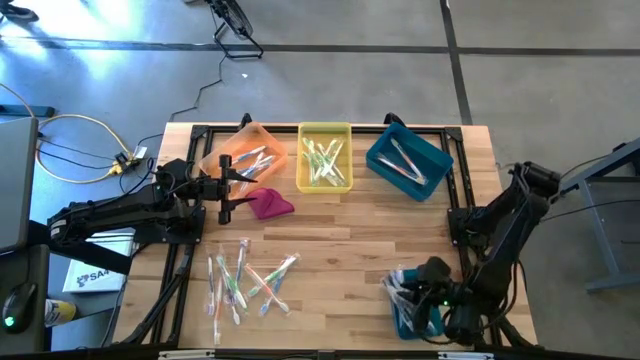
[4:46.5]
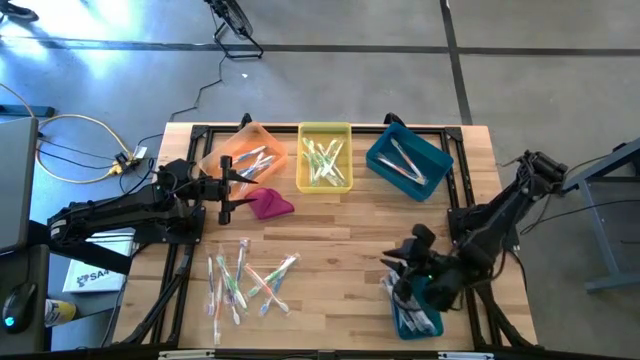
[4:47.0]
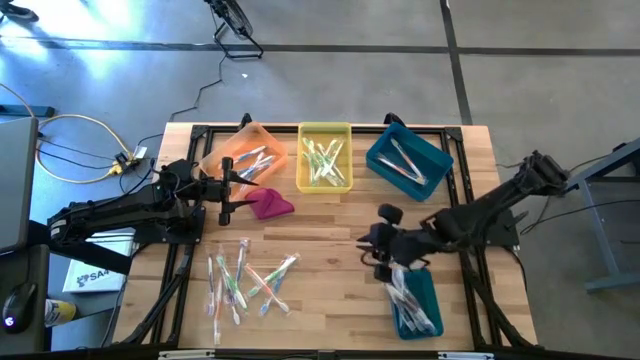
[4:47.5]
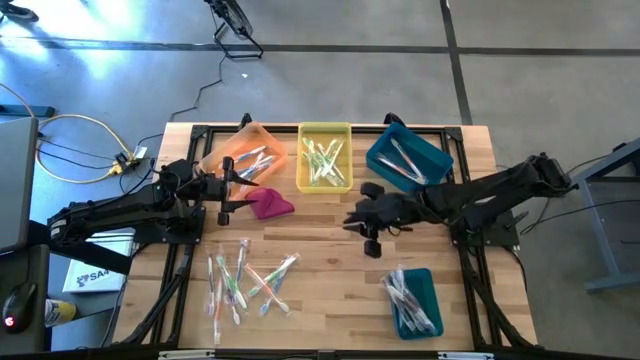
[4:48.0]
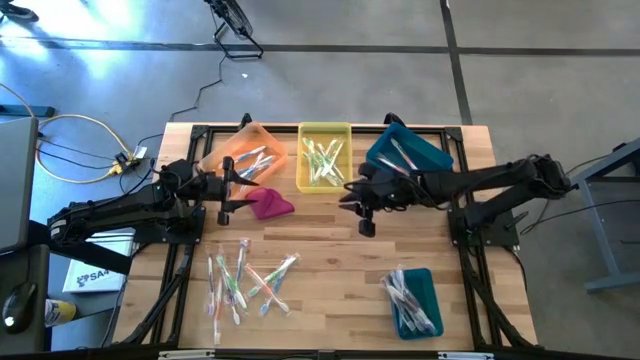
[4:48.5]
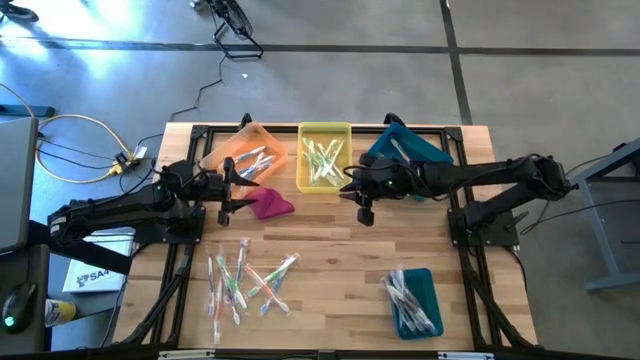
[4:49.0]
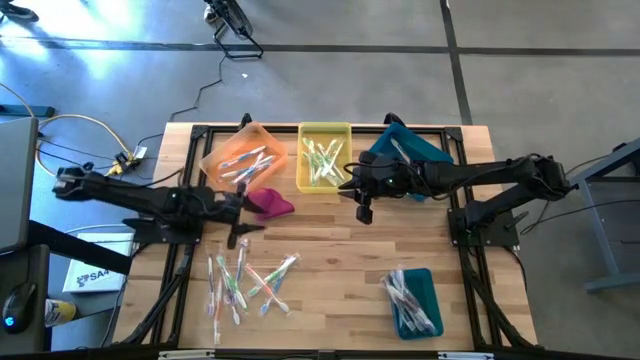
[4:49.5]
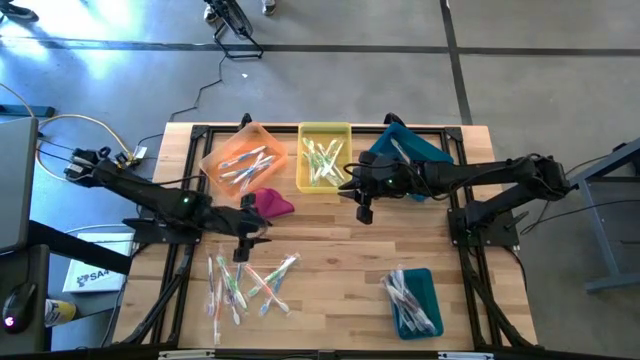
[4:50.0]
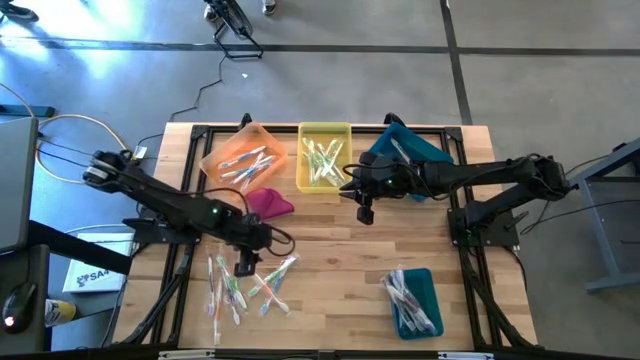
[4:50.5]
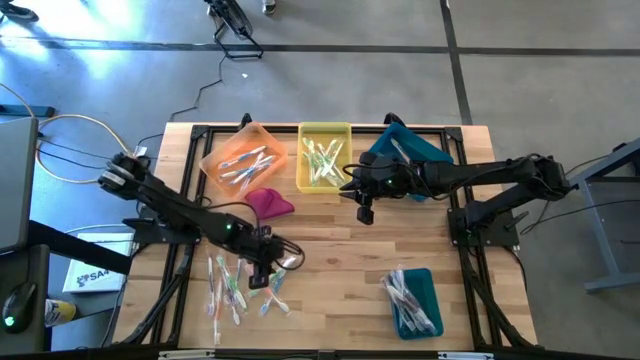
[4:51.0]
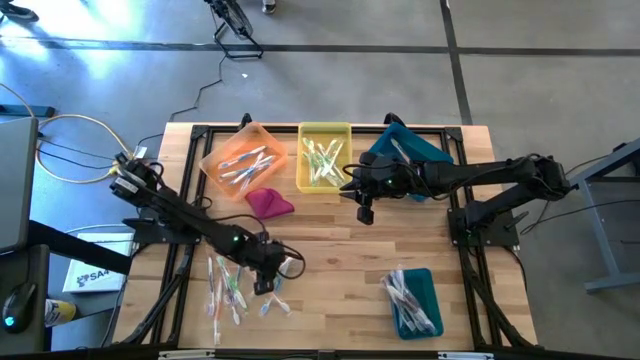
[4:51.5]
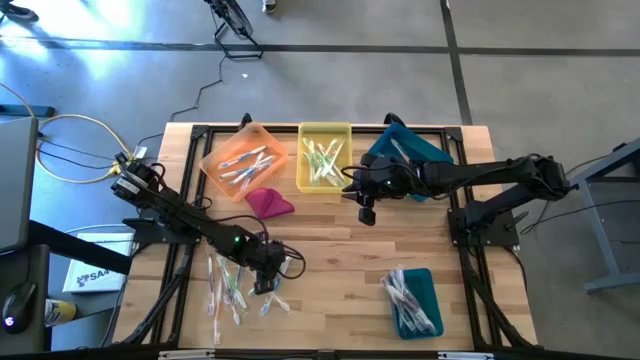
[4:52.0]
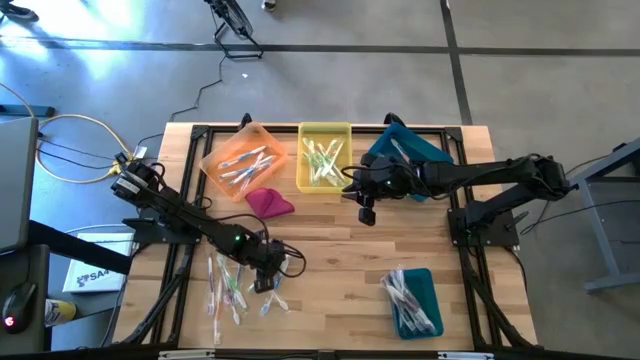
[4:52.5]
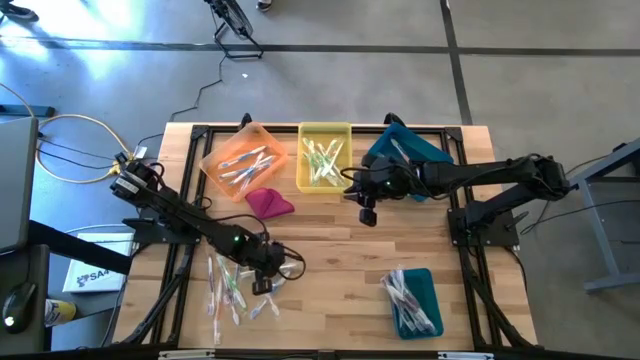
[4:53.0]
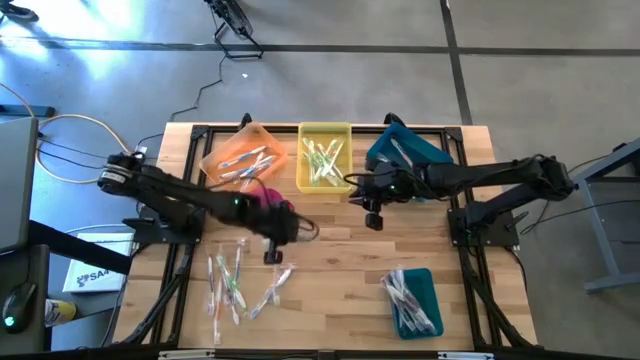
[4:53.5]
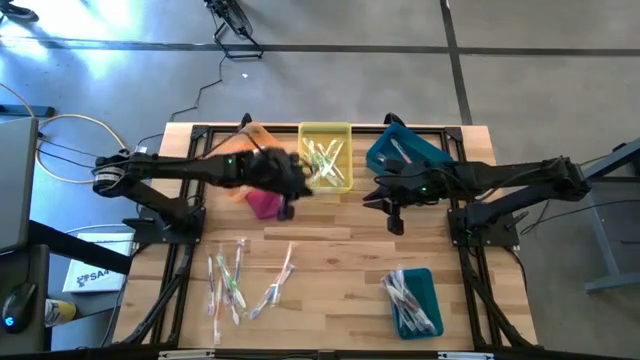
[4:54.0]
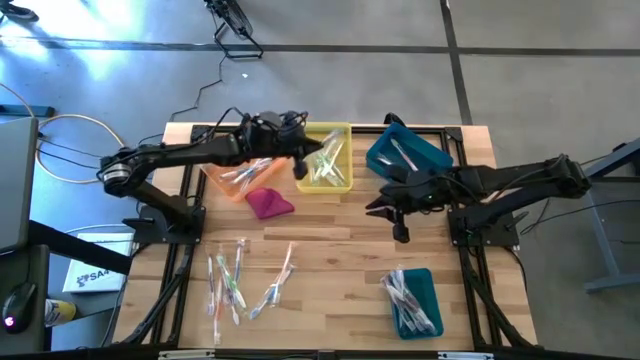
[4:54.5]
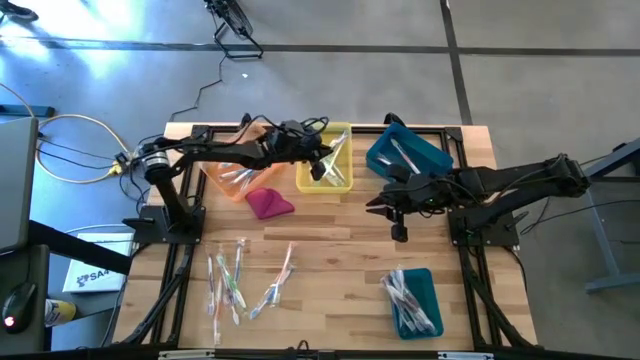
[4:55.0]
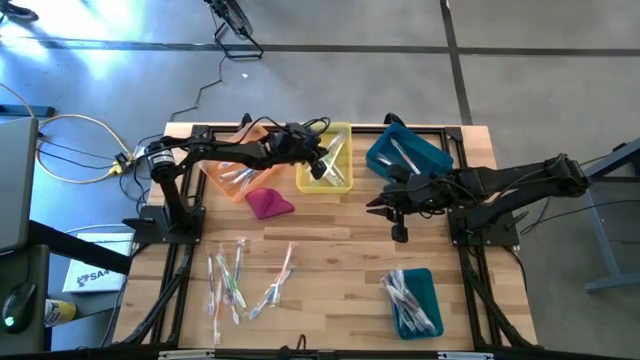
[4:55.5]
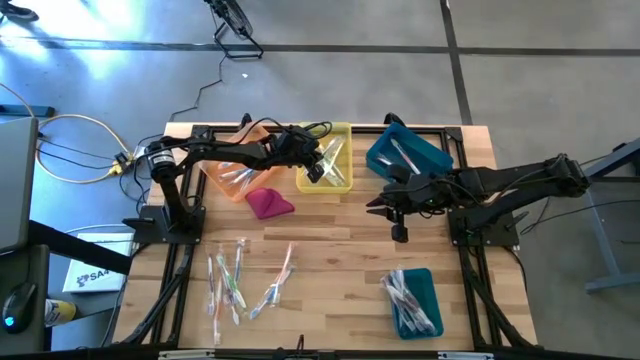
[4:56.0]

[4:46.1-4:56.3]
Task: Pick & Place Toothbrushes
Put the green toothbrush into the yellow bin

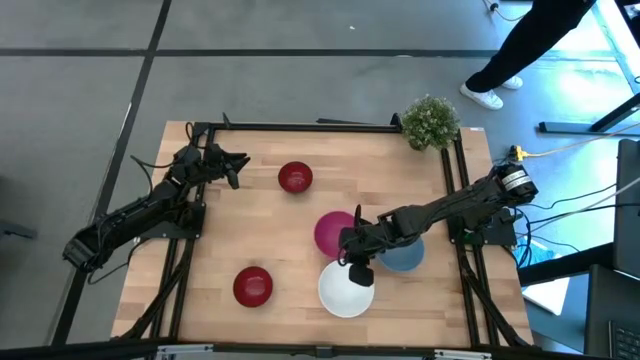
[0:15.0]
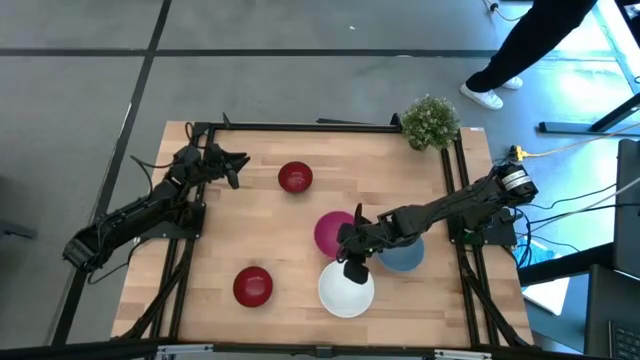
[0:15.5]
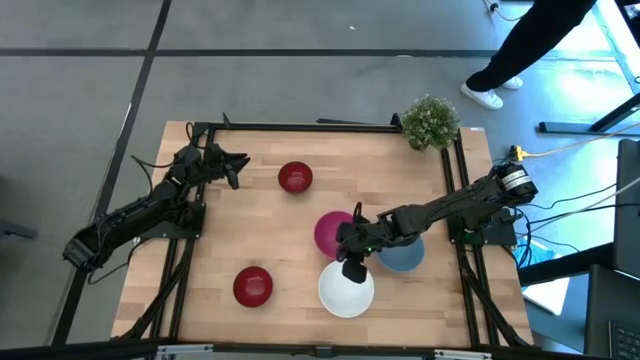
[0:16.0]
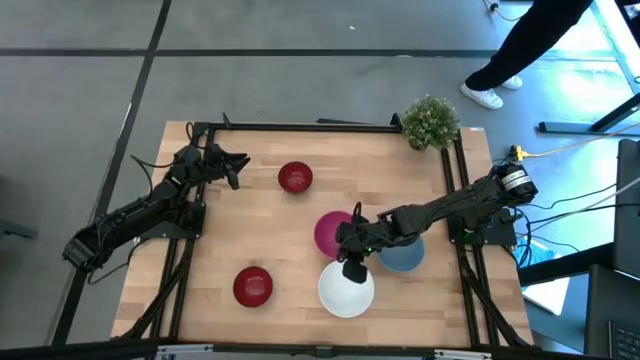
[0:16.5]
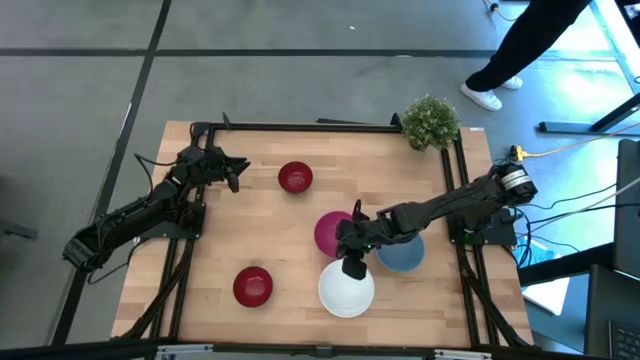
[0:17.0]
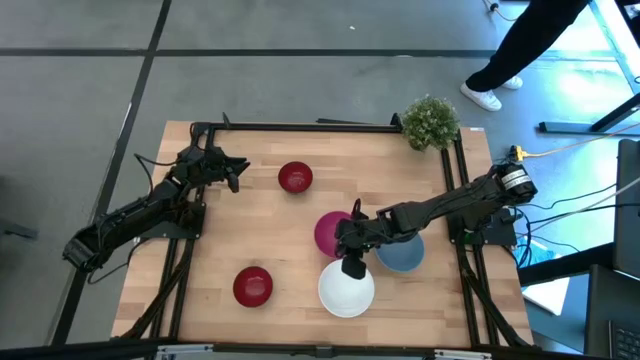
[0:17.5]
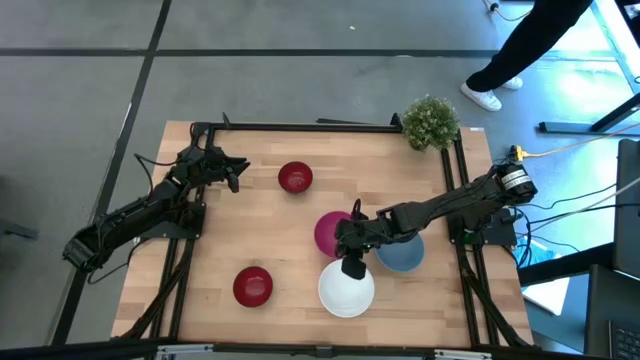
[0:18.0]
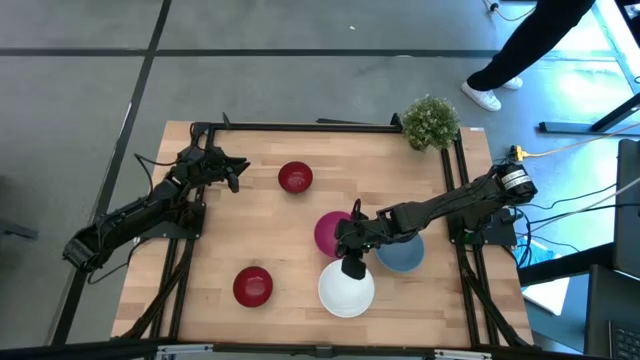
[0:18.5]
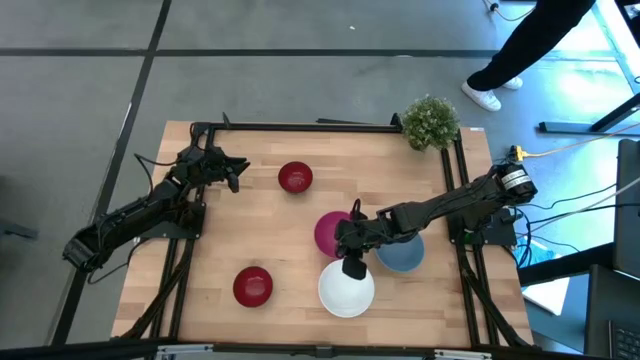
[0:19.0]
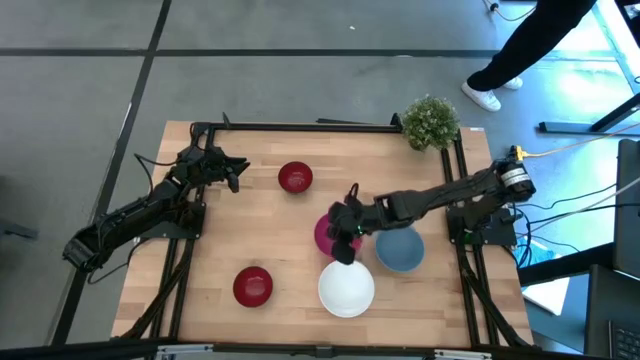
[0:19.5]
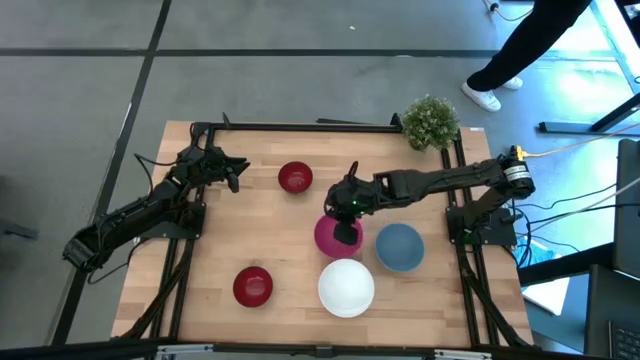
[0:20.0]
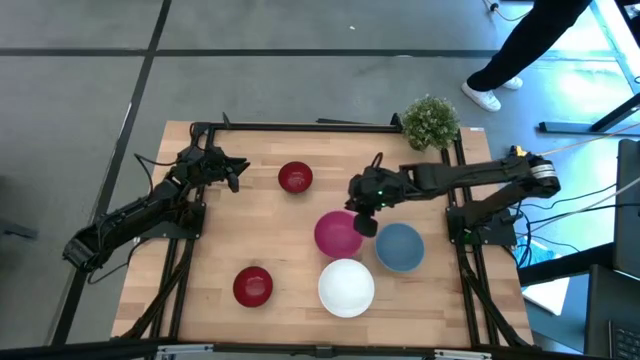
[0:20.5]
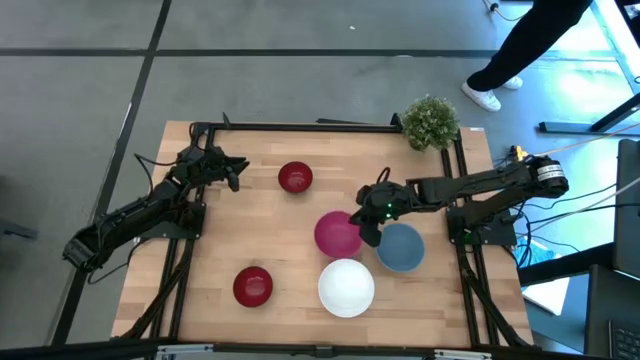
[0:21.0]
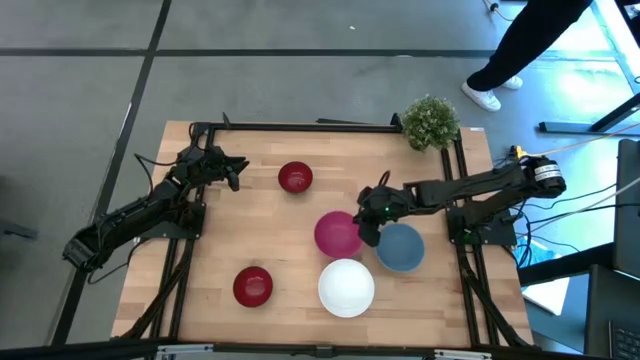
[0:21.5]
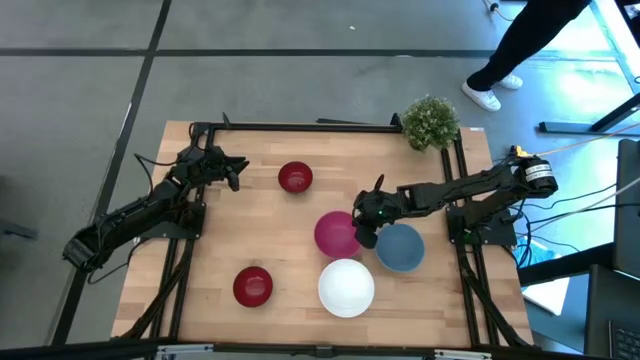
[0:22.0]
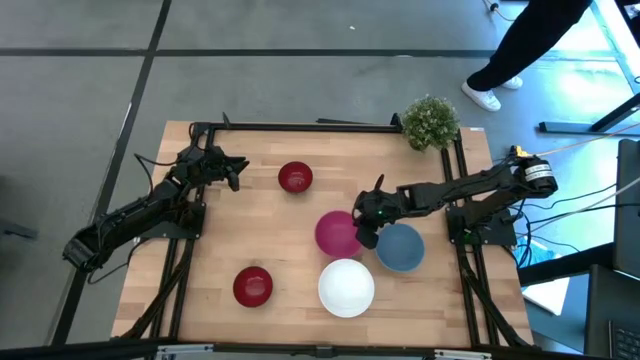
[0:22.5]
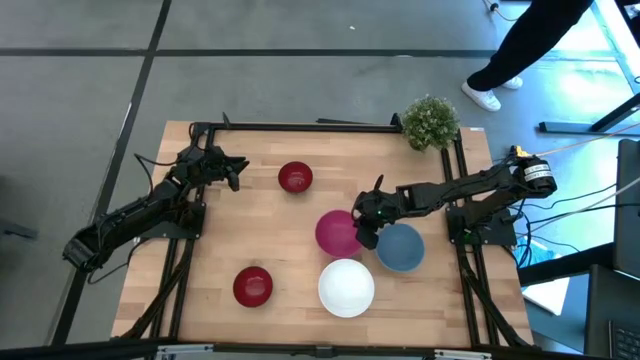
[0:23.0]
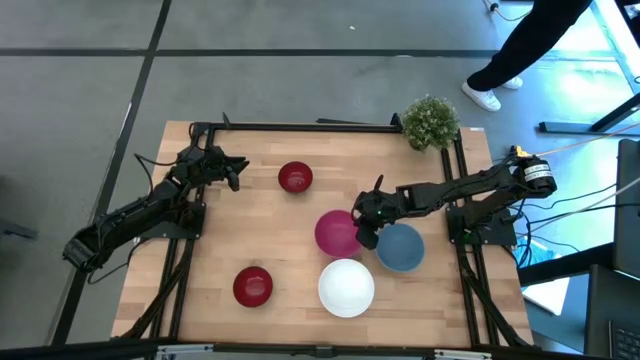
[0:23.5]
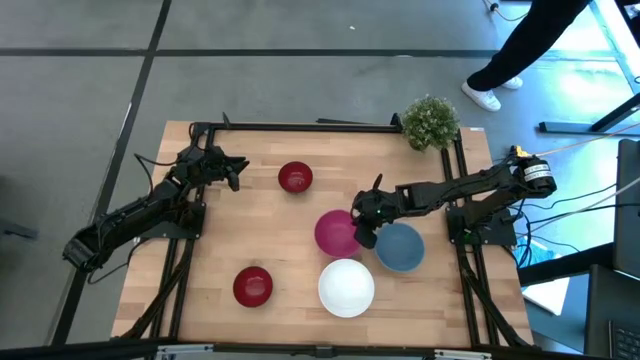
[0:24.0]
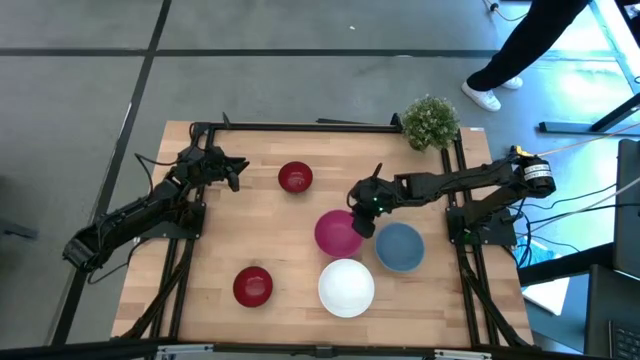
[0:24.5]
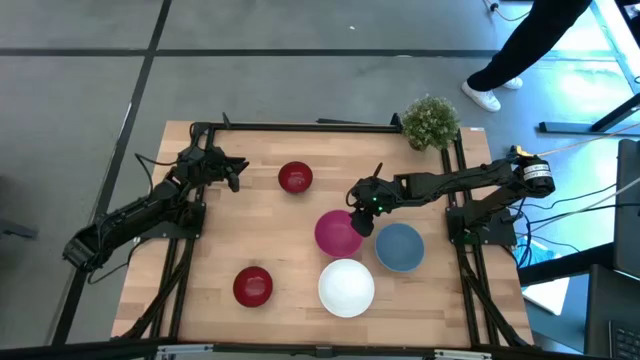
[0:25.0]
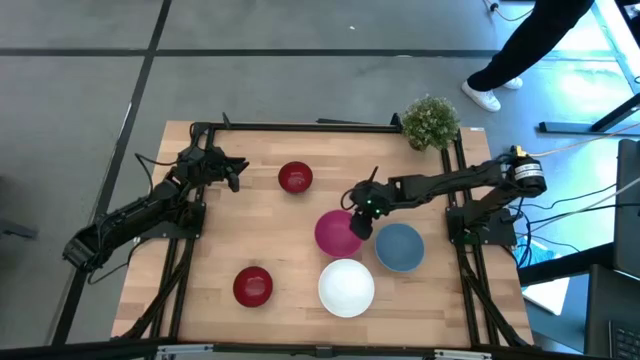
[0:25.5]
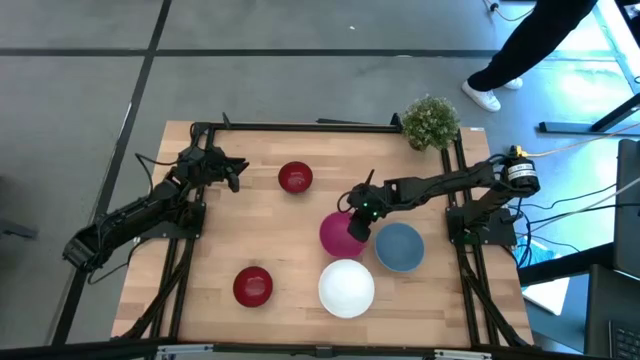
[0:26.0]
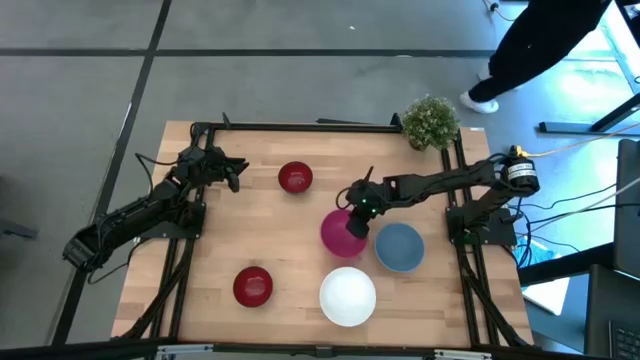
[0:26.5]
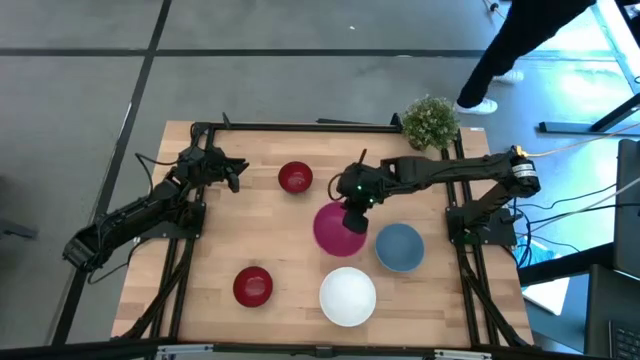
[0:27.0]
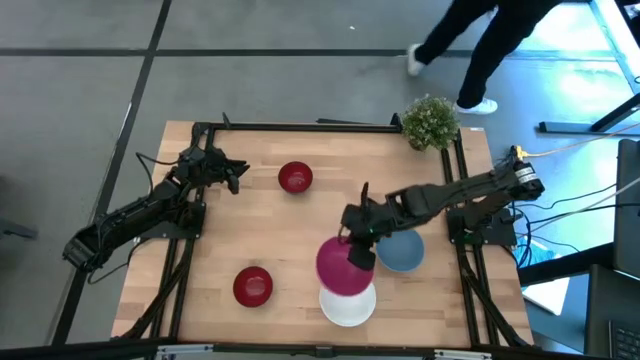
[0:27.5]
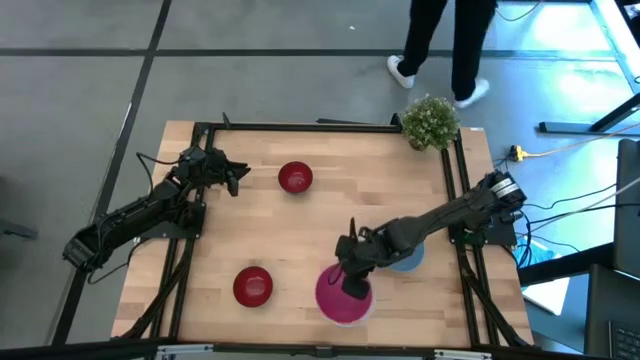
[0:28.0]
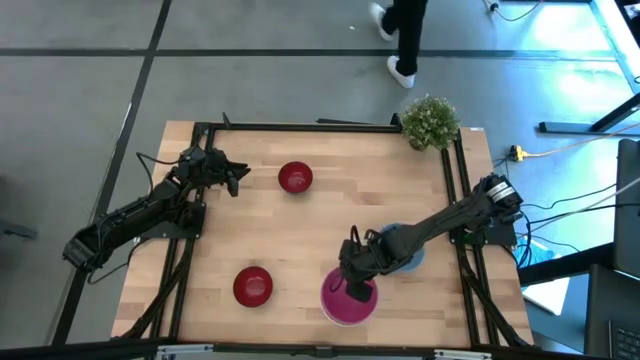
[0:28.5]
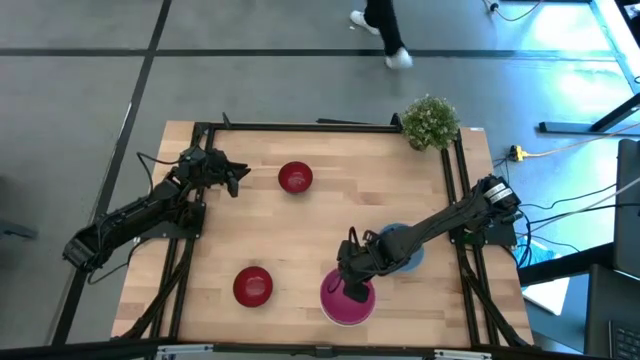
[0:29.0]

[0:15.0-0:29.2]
Task: Nest bowls inside each other
Stack the pink bowl on the white bowl
